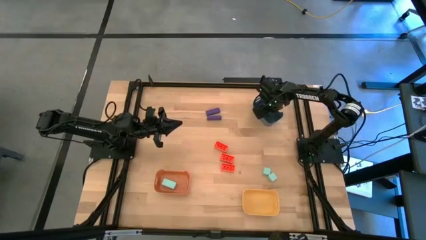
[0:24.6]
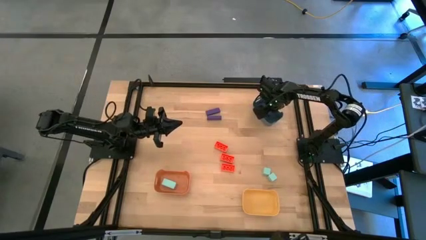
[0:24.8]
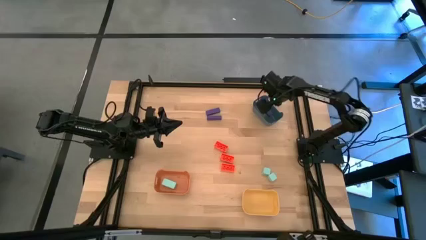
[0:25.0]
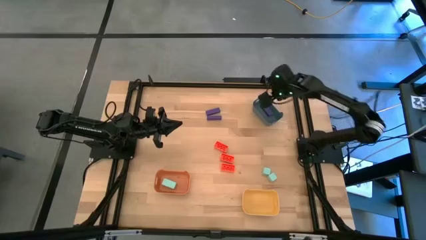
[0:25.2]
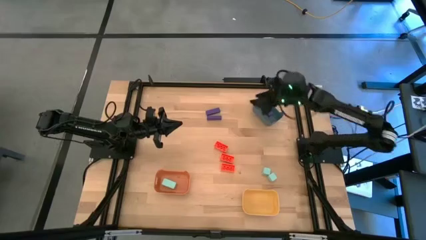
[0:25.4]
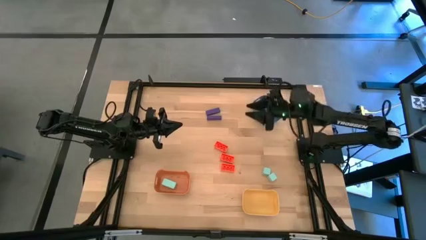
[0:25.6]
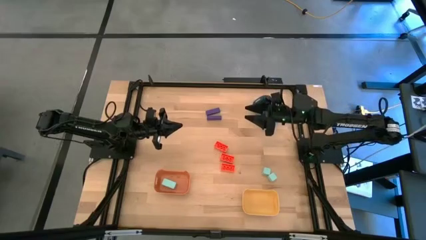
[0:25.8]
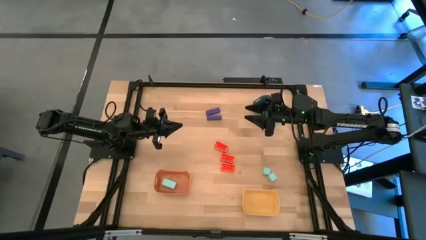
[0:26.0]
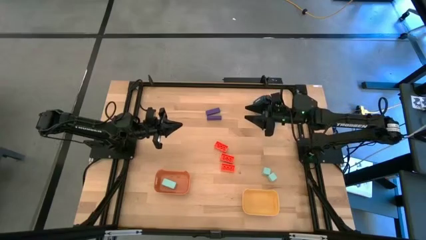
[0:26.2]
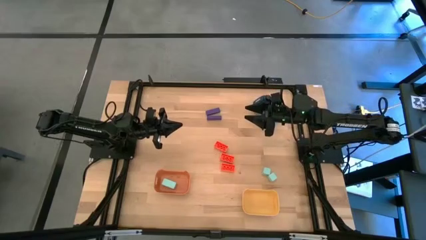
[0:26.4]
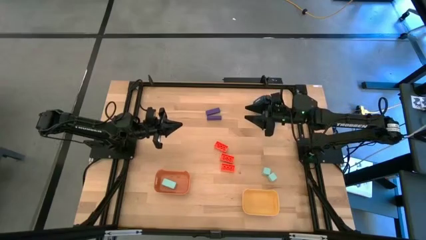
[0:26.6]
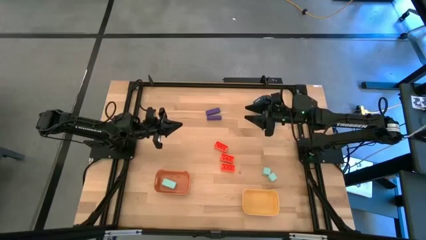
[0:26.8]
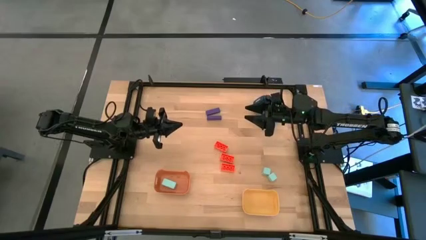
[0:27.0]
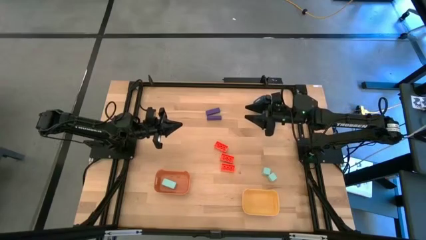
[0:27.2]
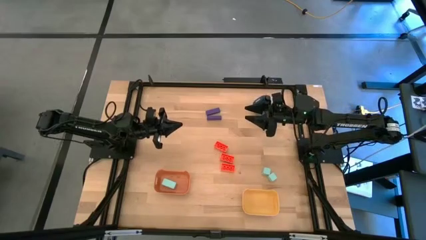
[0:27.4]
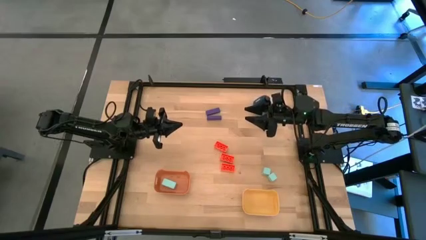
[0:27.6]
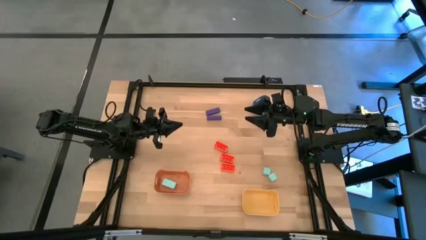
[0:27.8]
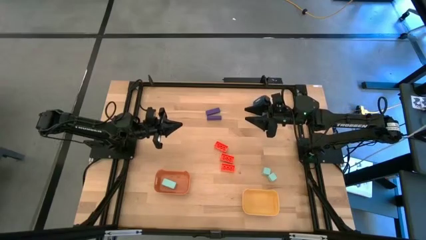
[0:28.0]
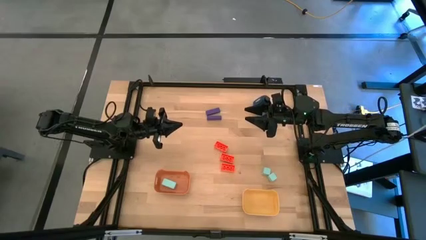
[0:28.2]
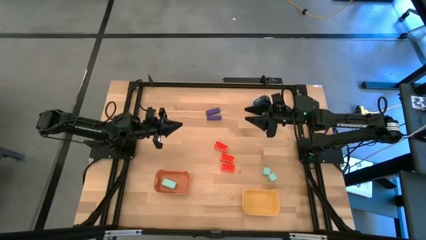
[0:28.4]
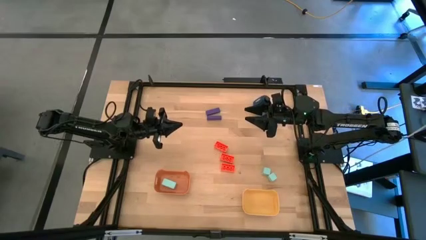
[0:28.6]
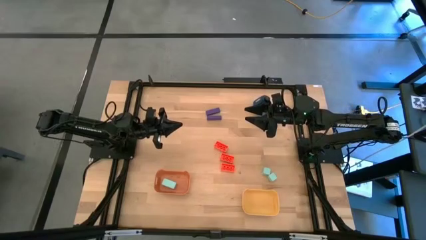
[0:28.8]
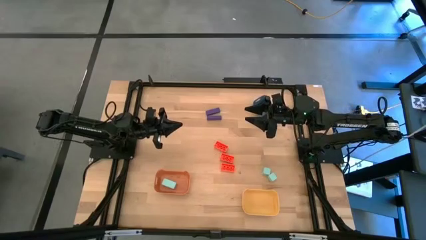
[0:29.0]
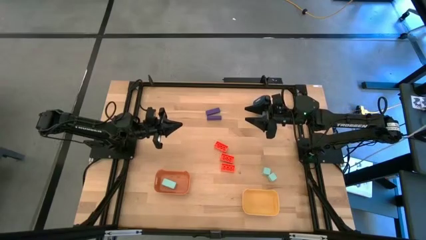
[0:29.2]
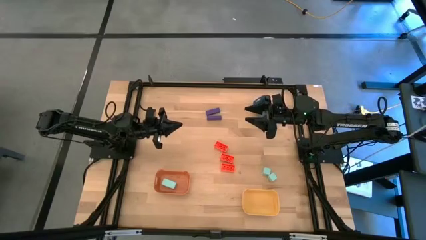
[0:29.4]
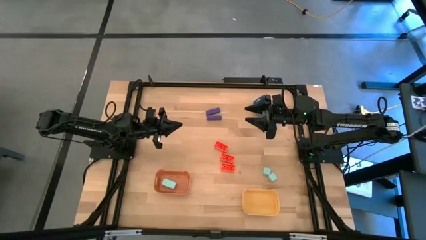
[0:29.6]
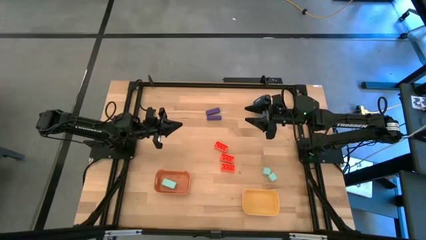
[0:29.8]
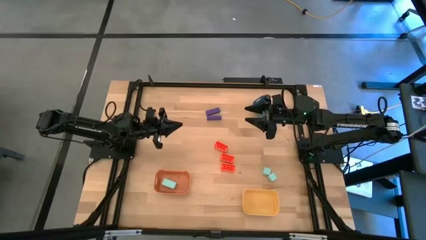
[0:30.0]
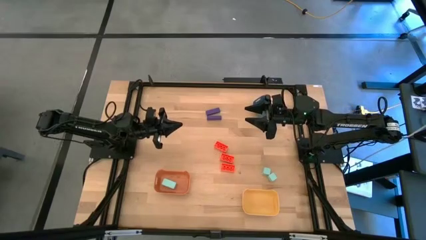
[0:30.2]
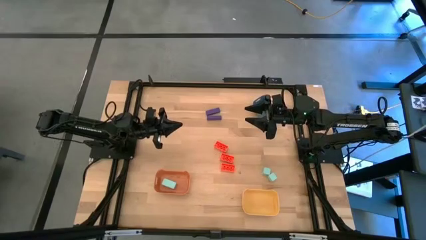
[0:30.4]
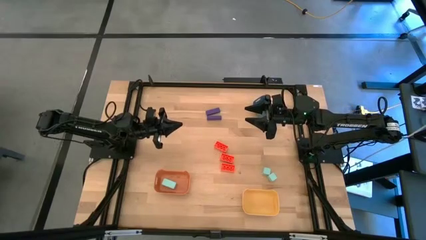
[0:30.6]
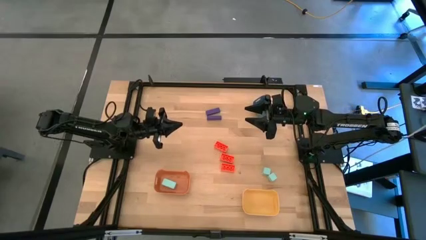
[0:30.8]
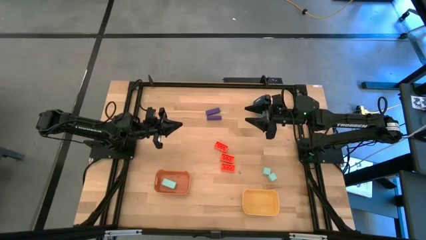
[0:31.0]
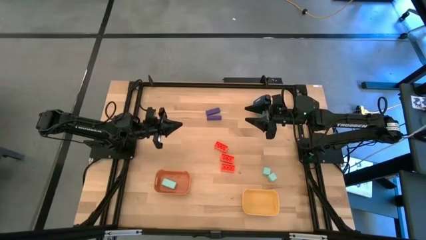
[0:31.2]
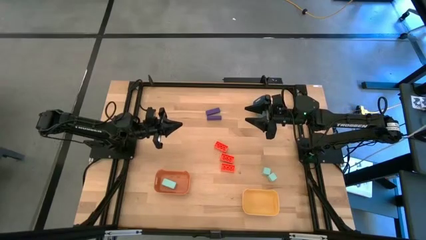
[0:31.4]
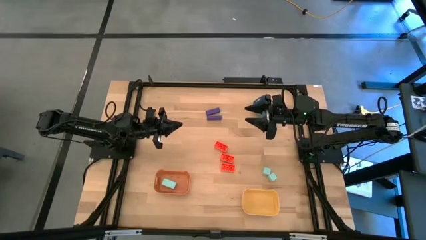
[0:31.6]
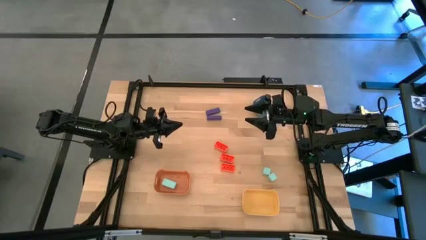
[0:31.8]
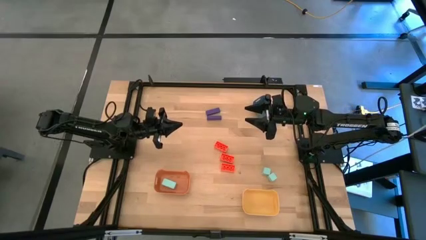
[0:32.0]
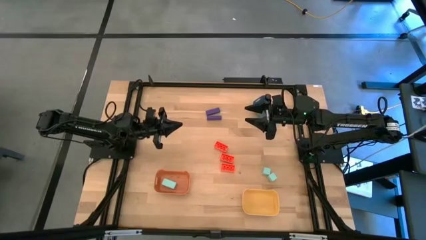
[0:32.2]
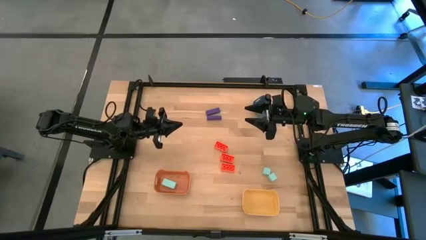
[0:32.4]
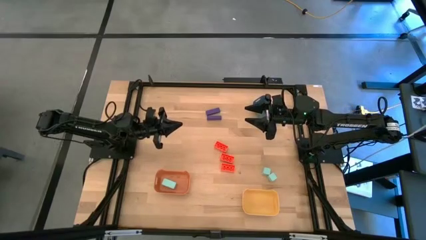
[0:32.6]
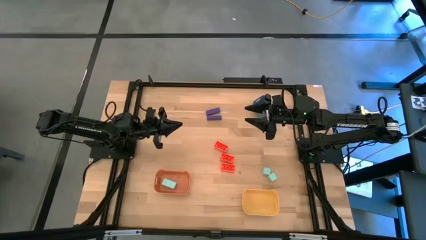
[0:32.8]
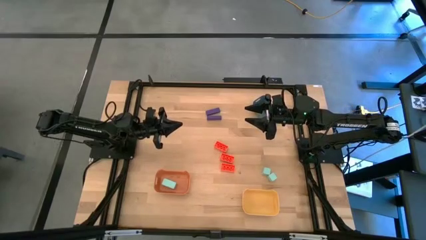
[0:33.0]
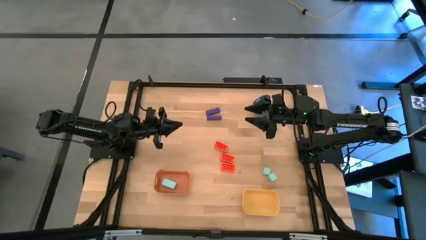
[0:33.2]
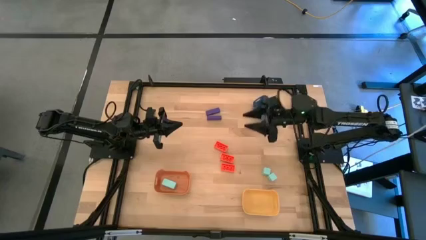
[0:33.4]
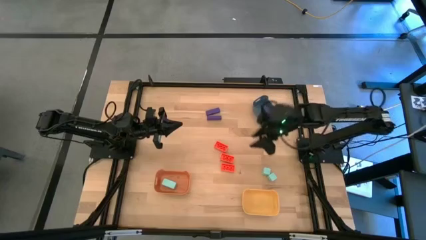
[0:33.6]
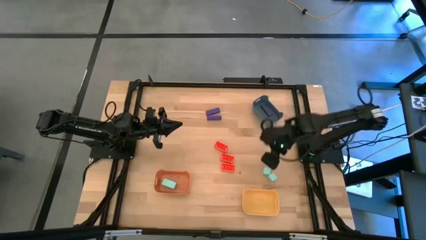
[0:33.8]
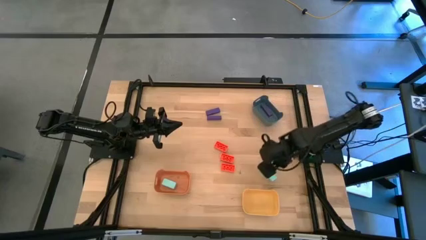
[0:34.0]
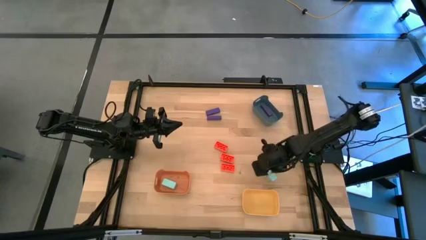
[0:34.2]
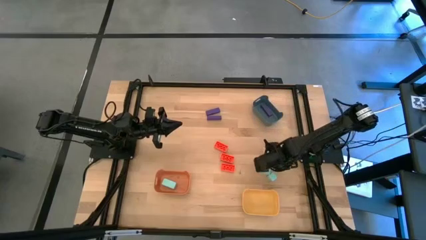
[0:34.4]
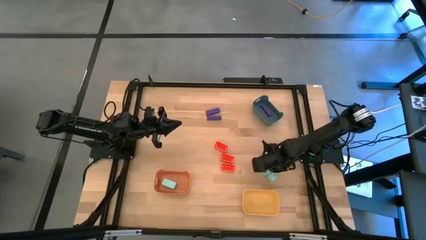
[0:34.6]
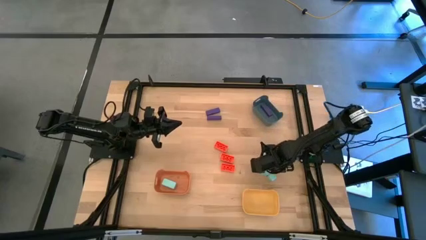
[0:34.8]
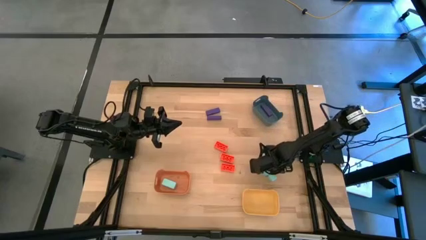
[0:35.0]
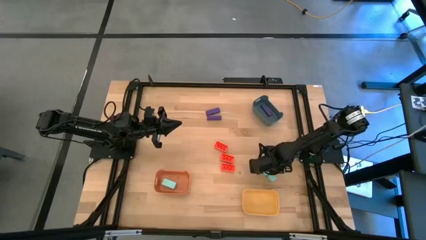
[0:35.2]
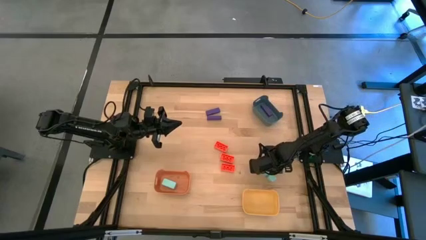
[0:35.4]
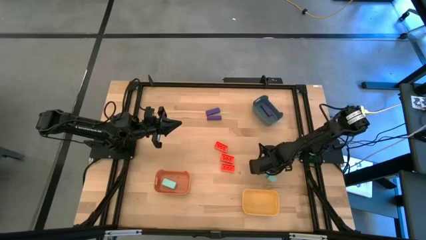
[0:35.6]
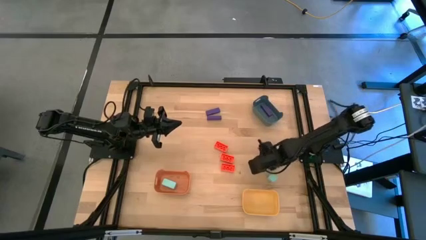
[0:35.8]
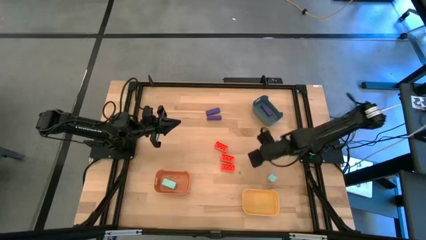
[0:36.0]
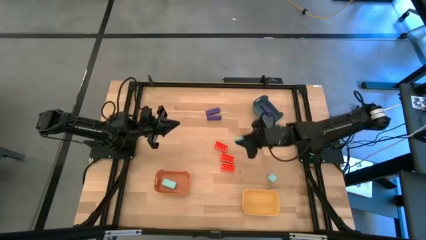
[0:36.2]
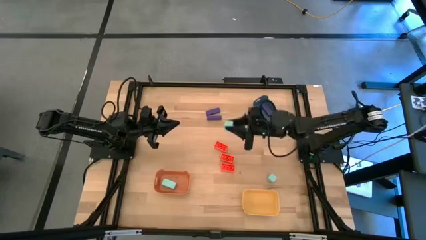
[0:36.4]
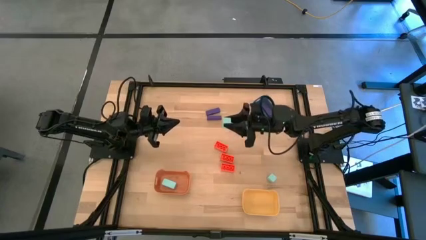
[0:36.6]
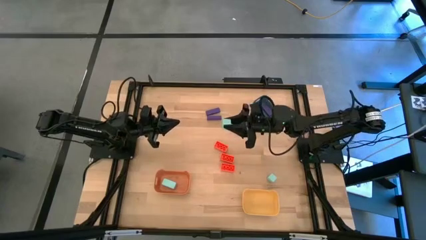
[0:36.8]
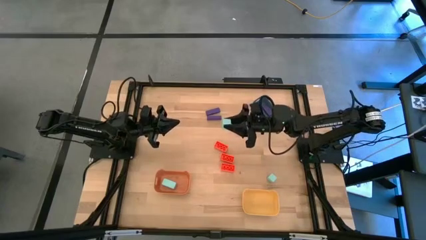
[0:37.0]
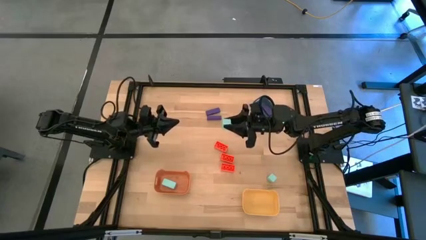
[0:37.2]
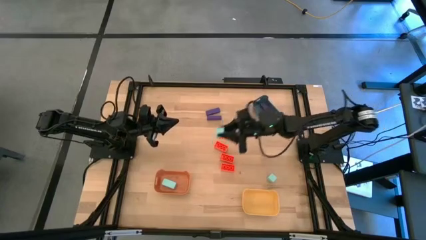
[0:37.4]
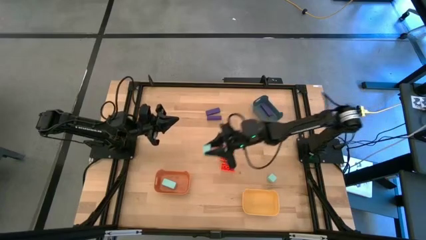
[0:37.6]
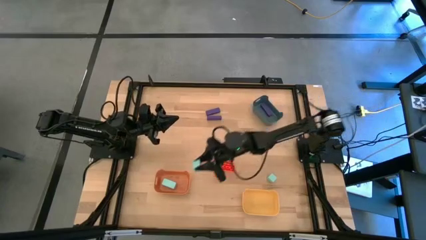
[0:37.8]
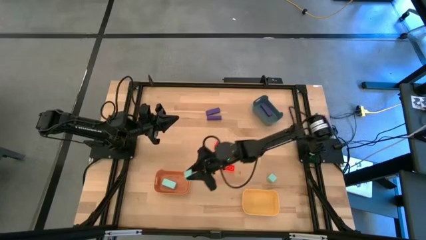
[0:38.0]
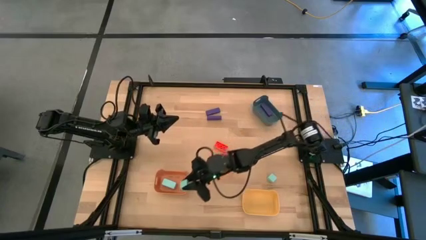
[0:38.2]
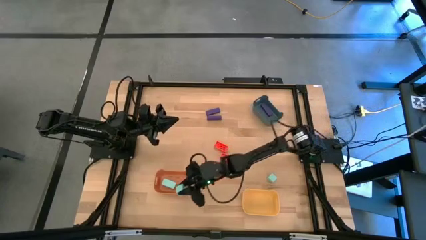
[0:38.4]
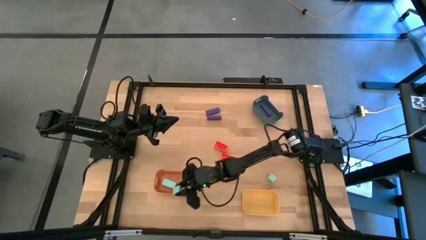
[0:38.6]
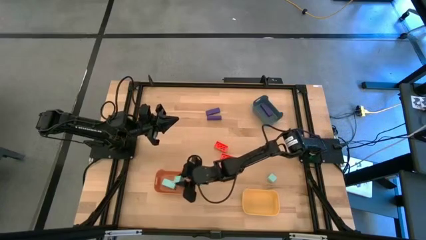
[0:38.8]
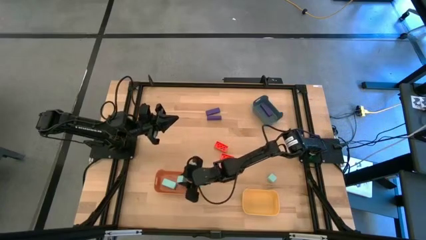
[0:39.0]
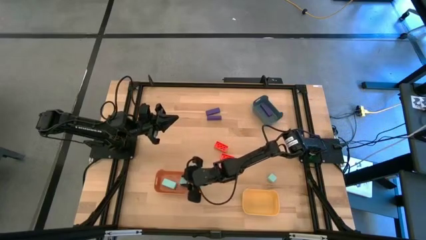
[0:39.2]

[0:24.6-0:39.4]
Task: Sort & place blocks by color
Put the top light blue block into the brown bin
